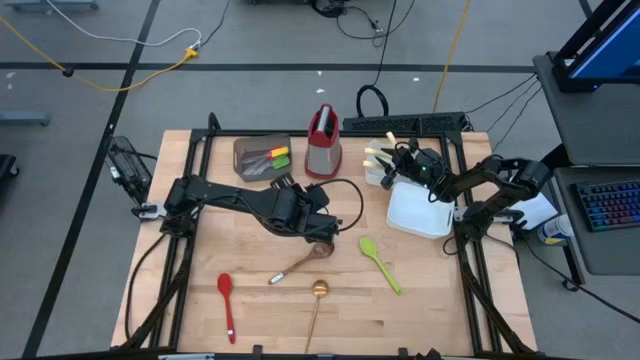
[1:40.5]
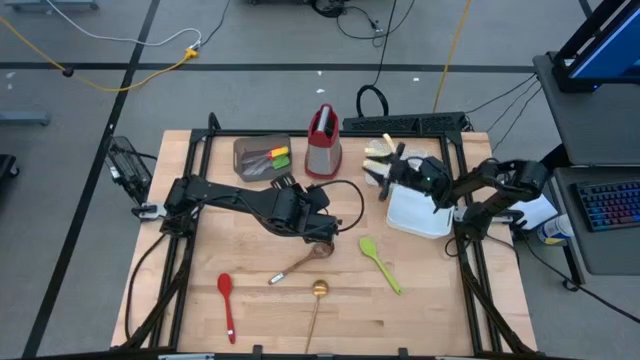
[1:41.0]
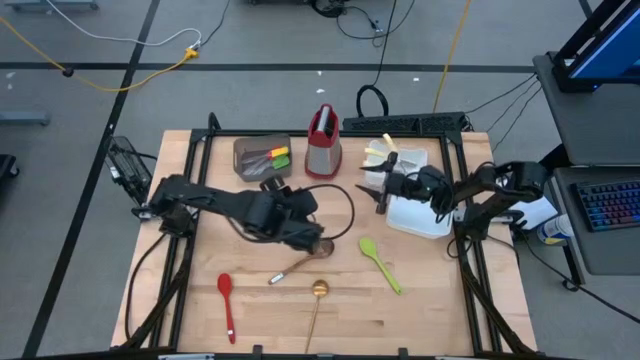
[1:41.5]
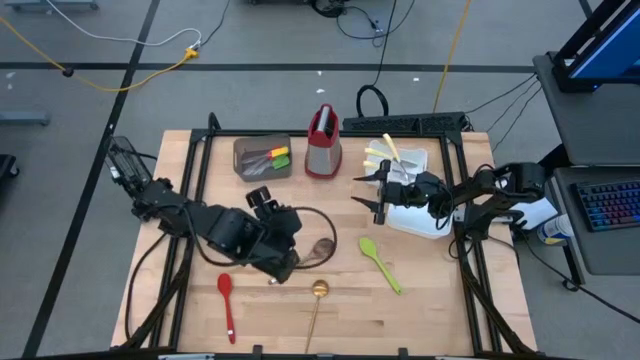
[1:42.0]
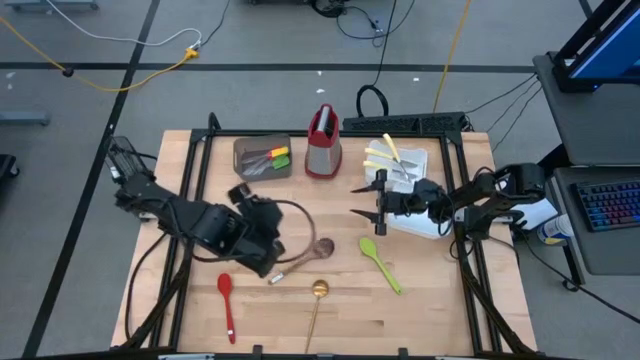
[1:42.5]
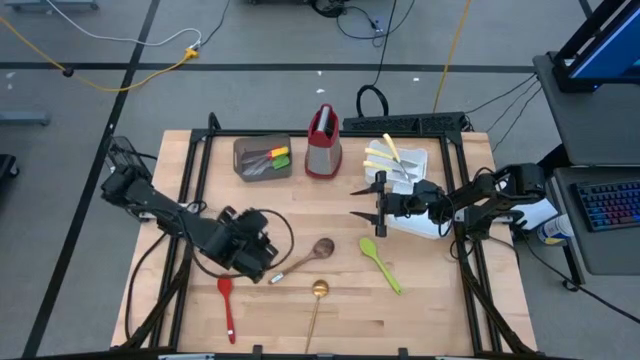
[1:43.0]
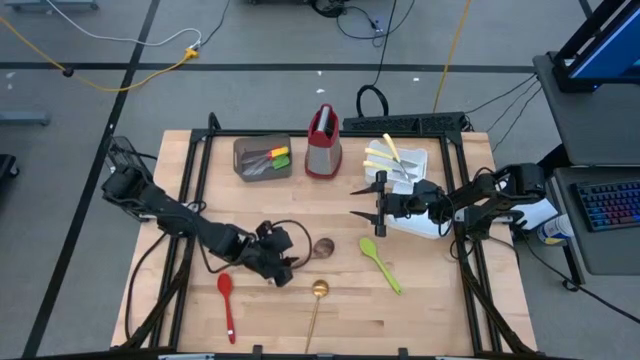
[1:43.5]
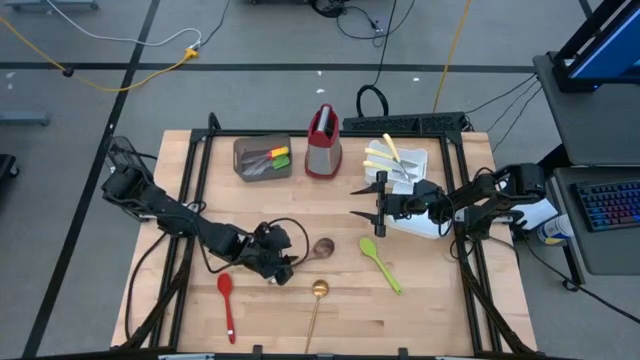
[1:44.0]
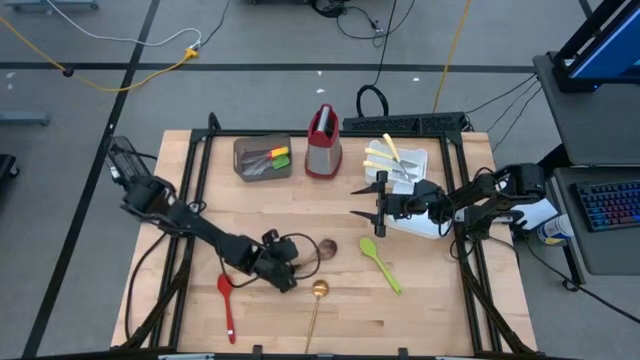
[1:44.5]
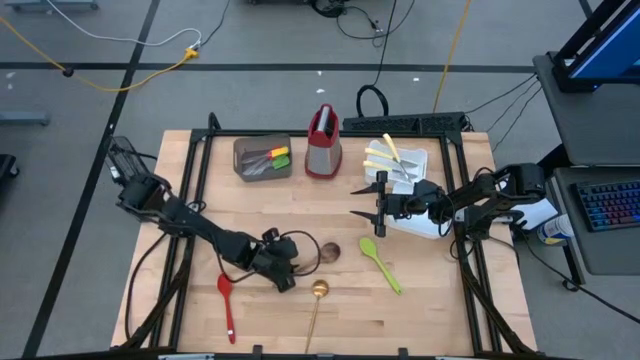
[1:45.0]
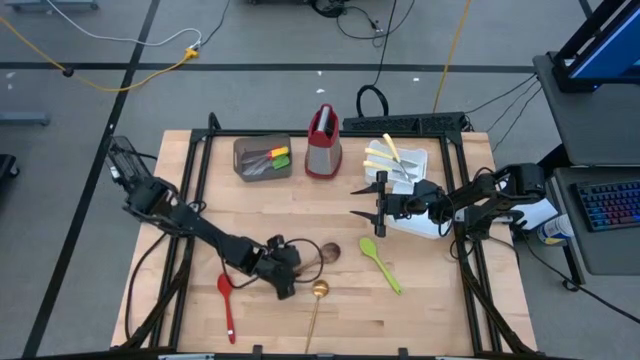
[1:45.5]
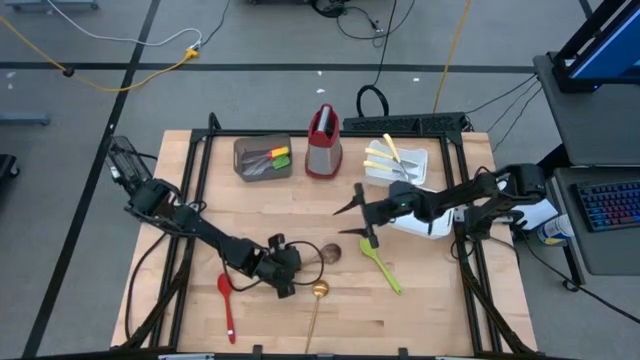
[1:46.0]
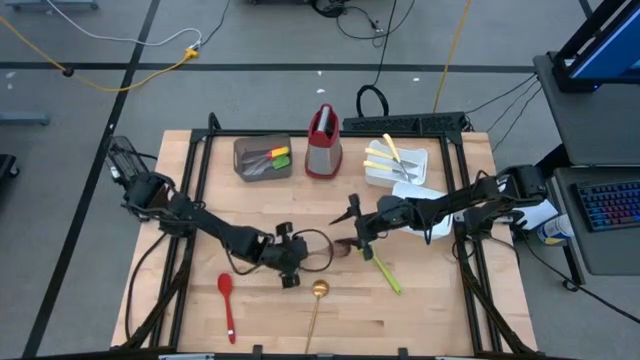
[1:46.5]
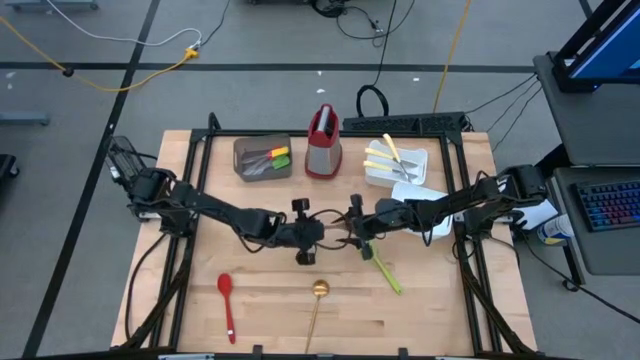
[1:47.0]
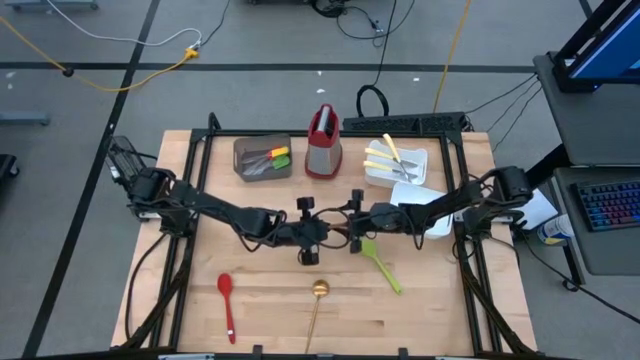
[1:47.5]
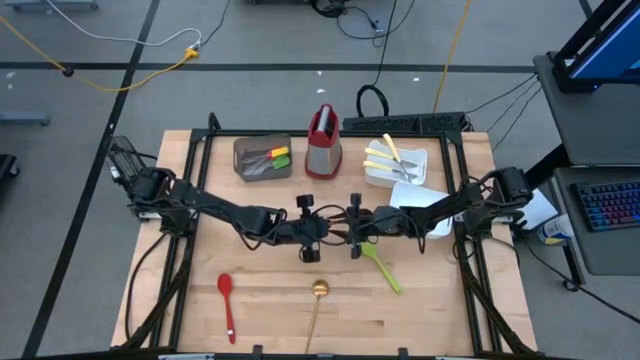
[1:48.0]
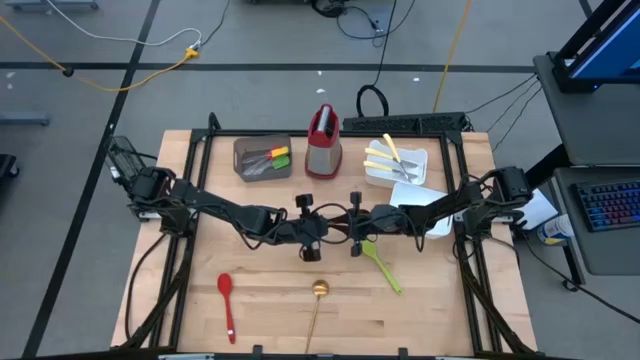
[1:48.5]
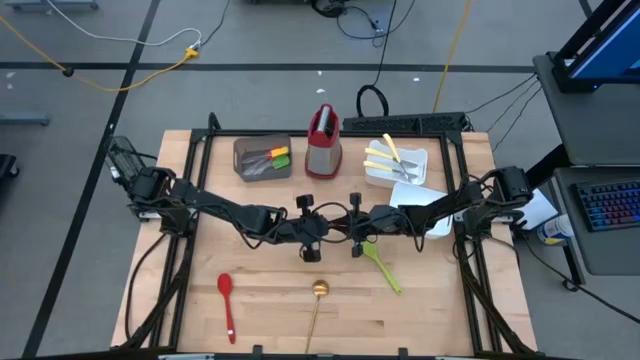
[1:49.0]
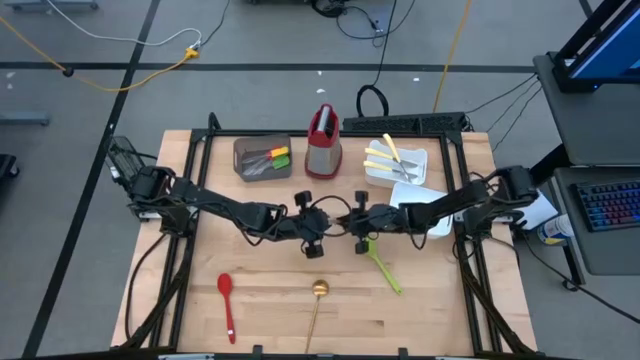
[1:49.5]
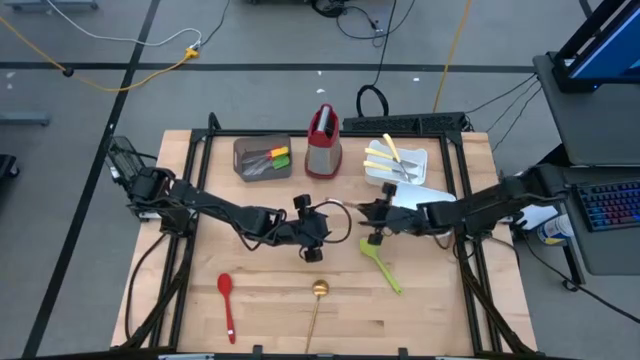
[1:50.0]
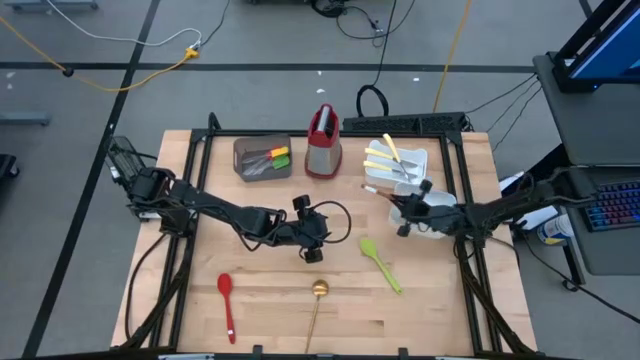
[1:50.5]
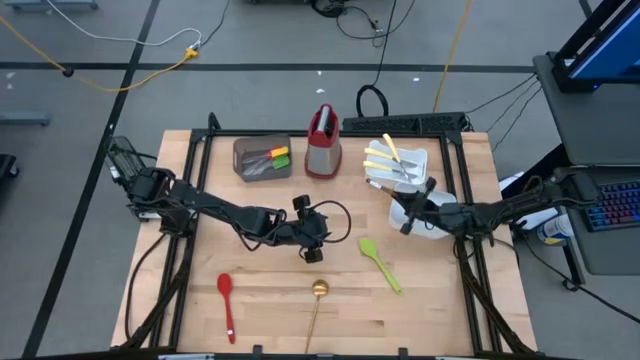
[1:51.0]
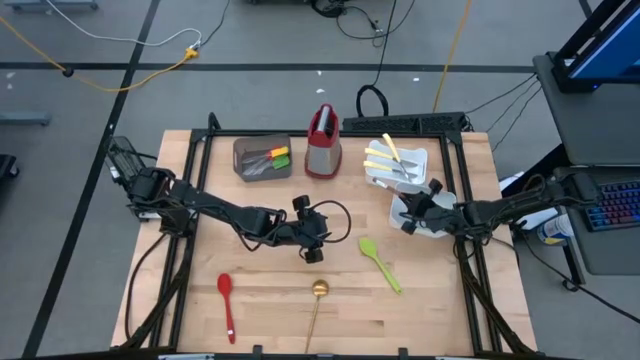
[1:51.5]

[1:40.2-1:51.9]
Task: Pick & Place Kitchen Items
Put the brown serving spoon into the bottom white bin

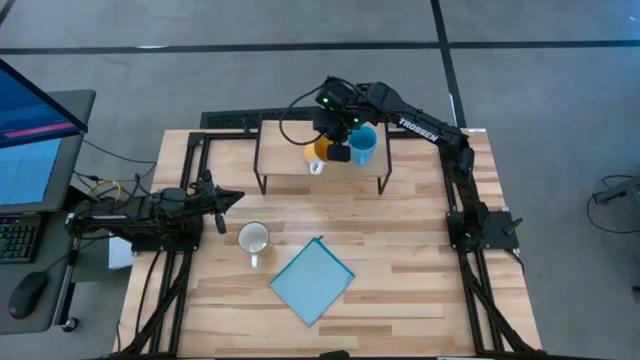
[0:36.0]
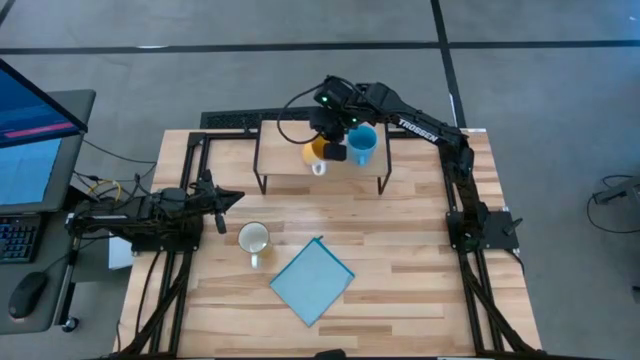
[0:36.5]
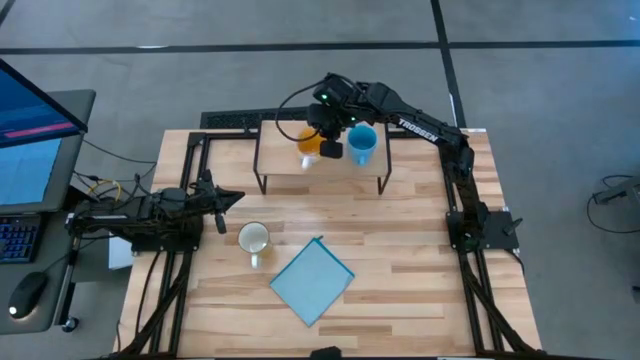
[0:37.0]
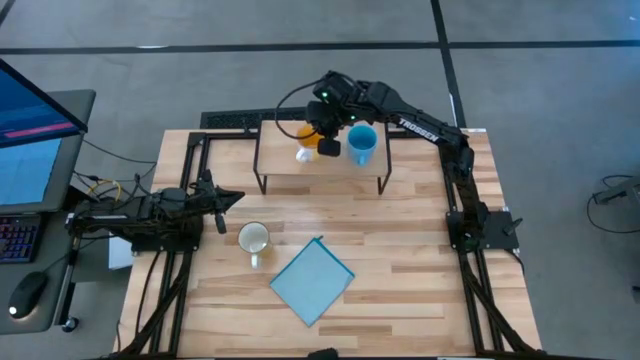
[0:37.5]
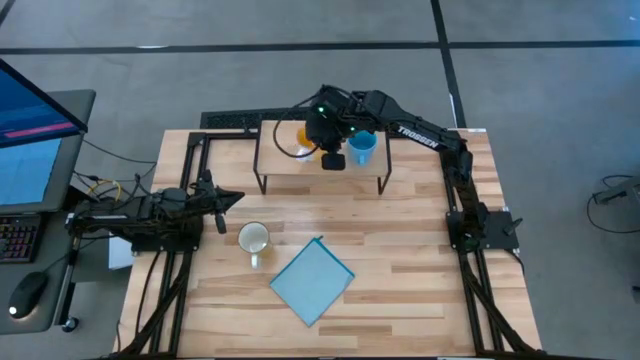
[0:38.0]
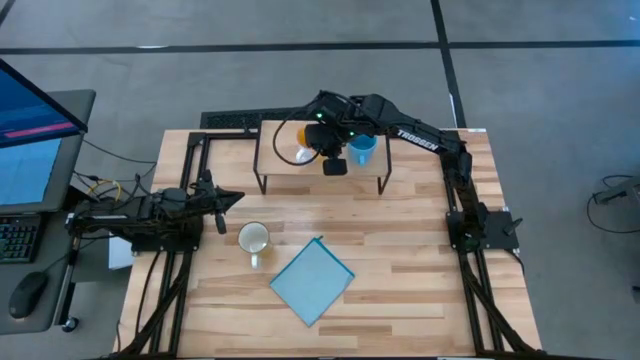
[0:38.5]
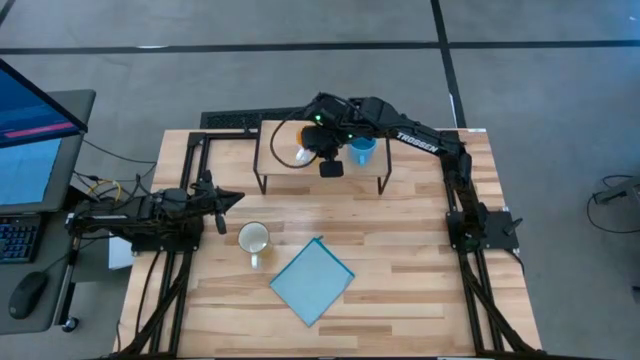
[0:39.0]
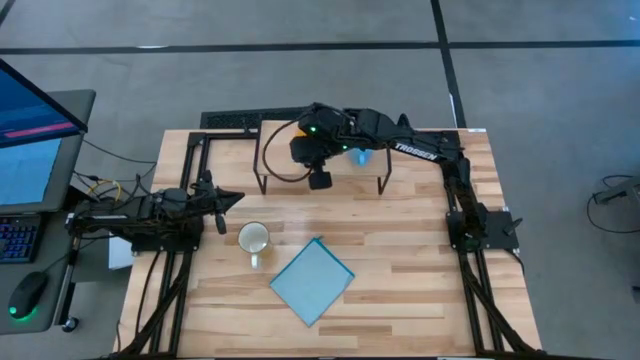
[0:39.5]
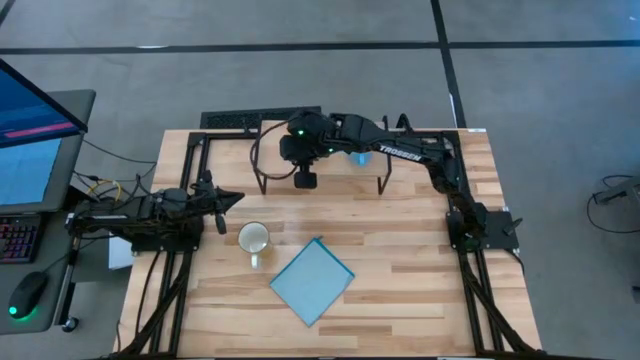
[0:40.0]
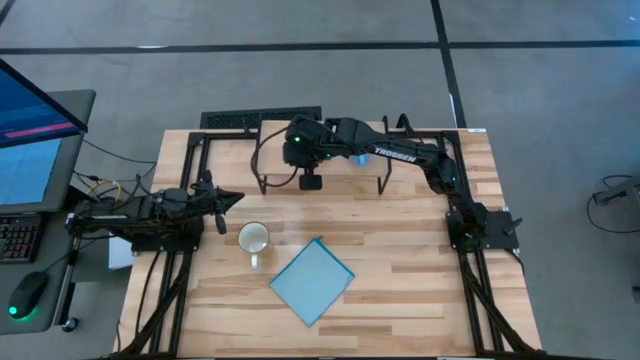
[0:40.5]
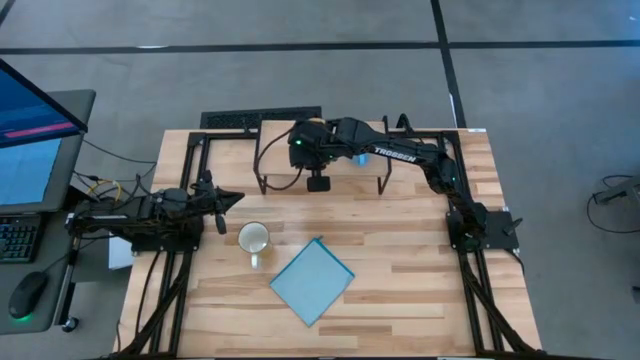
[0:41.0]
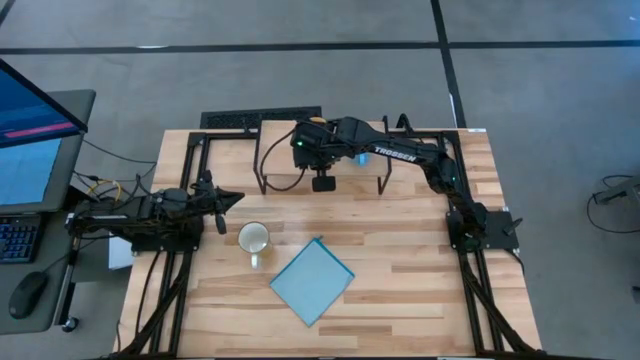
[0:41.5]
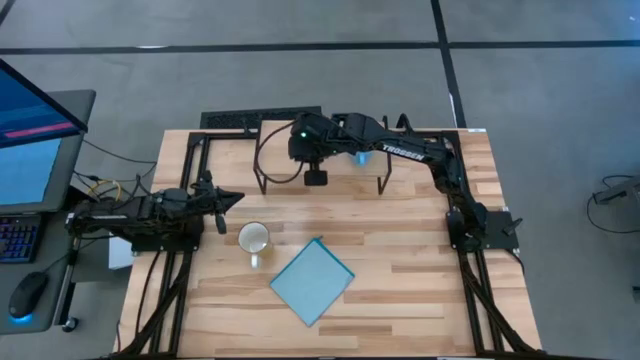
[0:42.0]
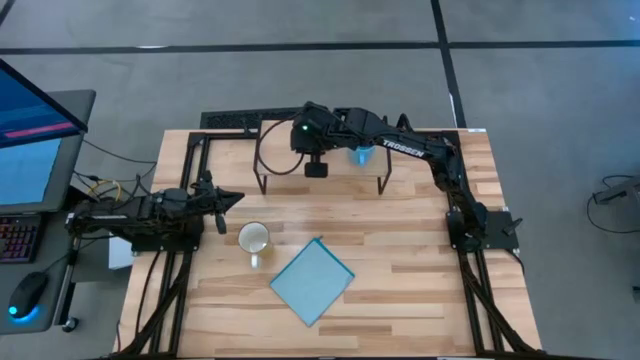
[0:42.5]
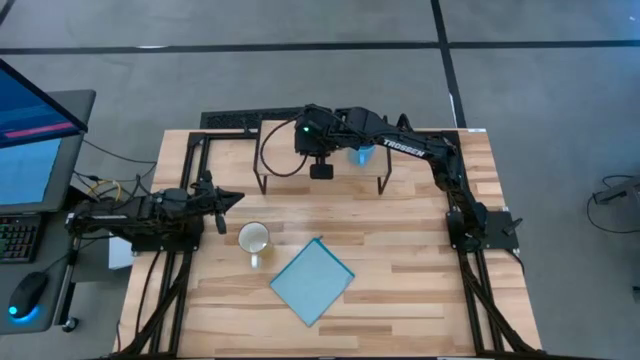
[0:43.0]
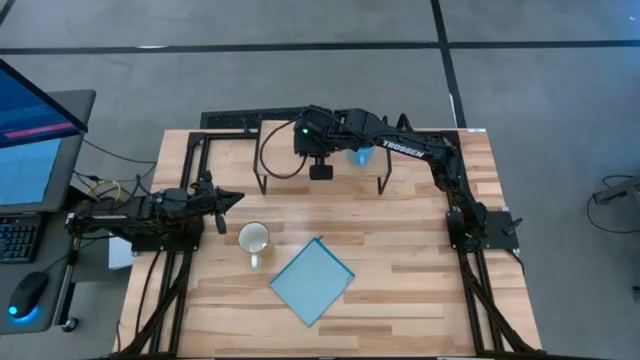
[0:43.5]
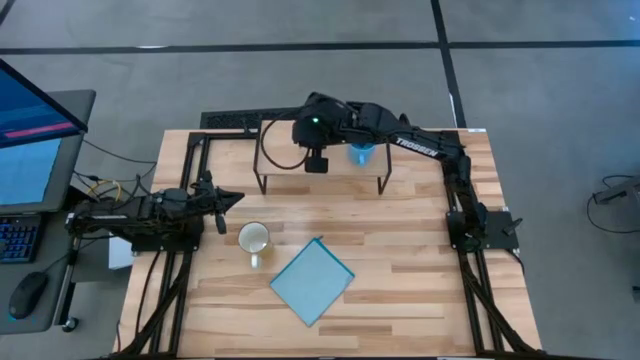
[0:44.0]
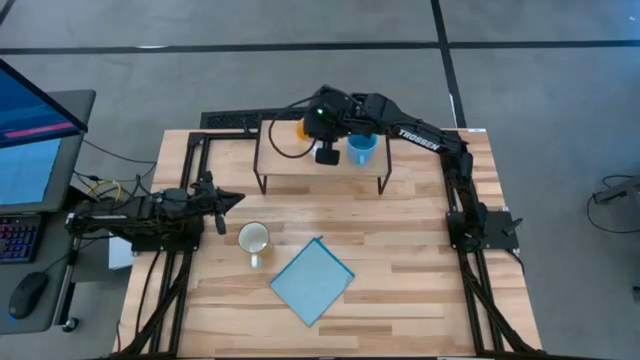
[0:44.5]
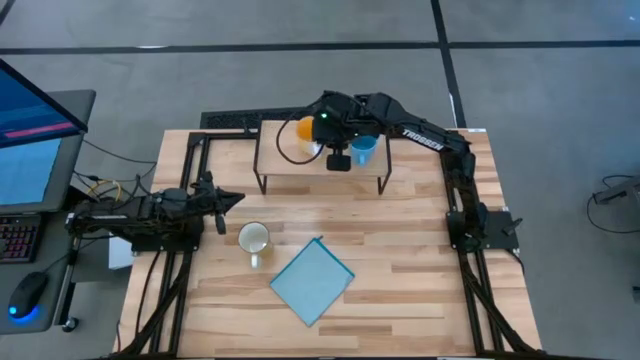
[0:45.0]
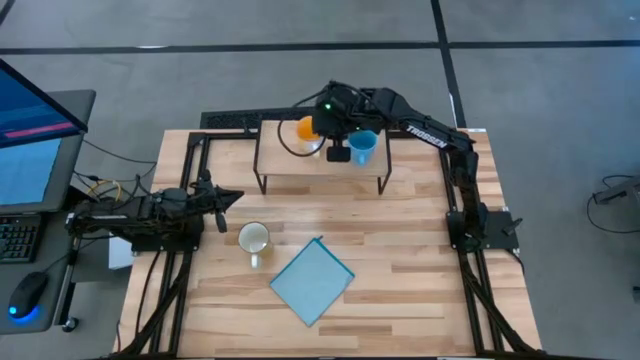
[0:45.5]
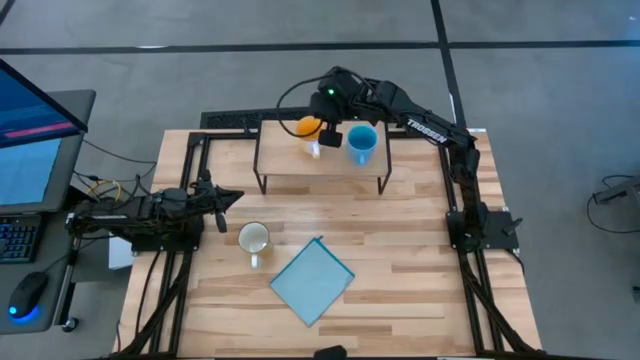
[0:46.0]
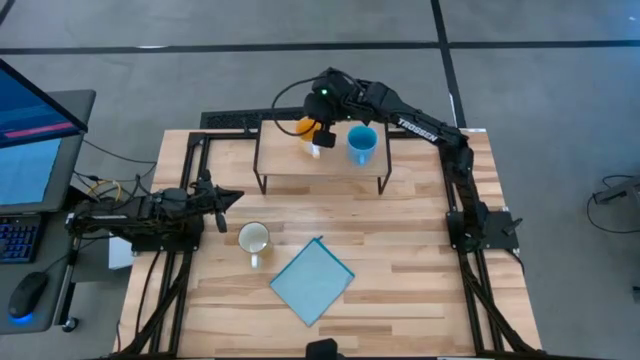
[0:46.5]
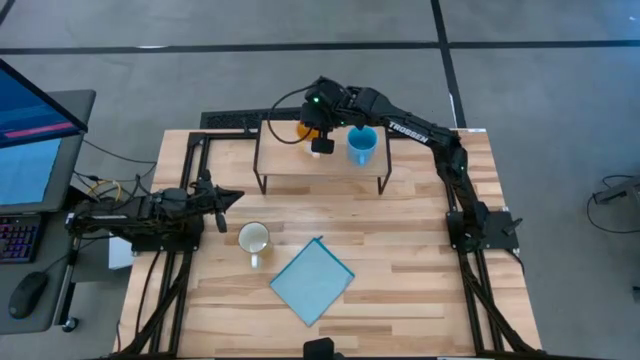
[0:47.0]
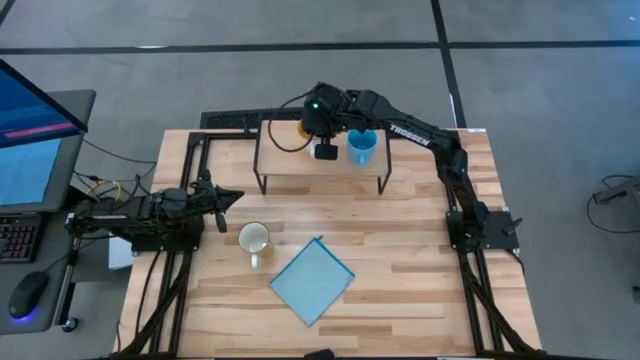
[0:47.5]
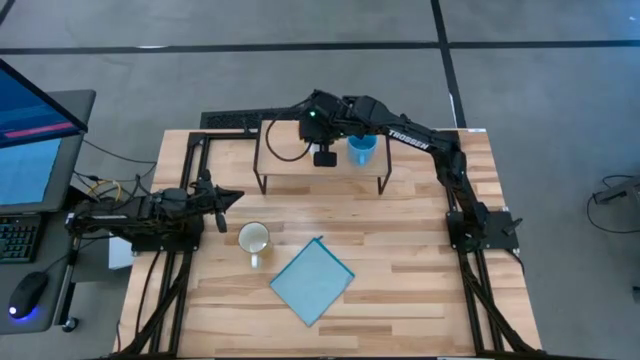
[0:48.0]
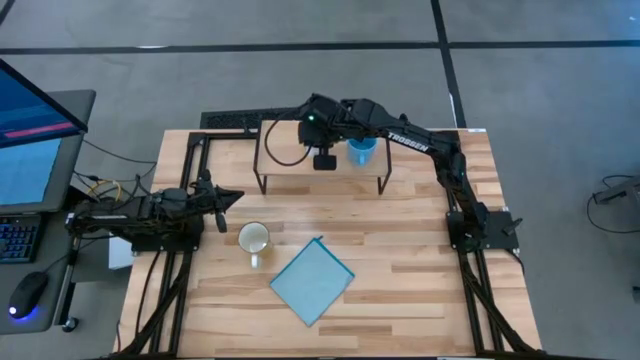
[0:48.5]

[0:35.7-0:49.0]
Task: Stack small to large cups/mugs on shelf
Put the yellow mug on the shelf
